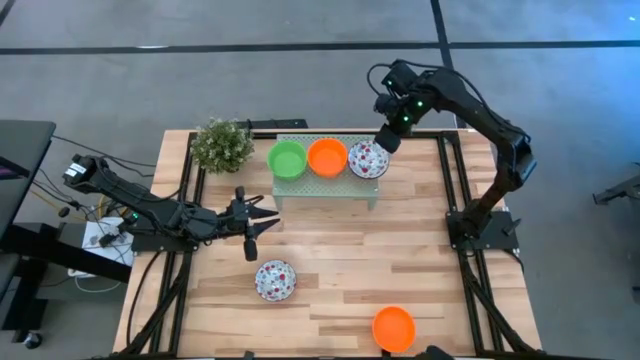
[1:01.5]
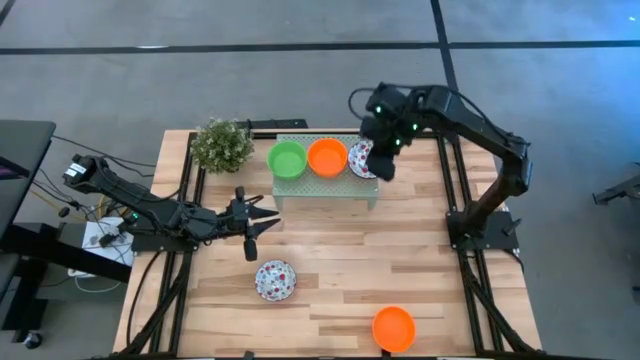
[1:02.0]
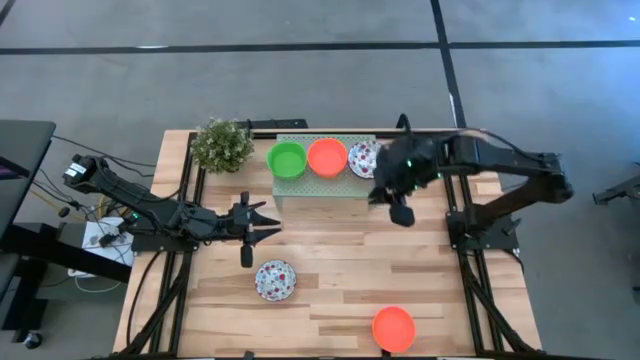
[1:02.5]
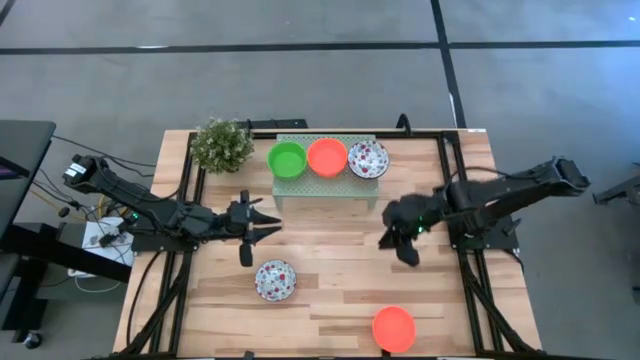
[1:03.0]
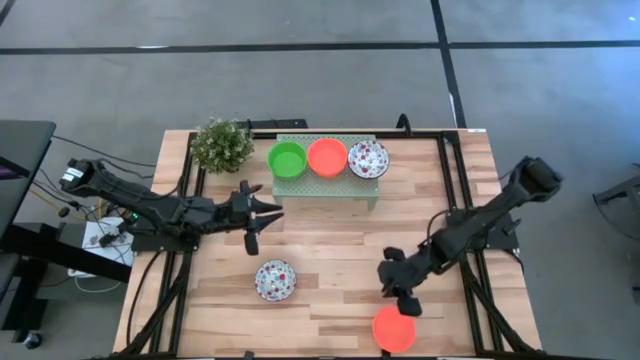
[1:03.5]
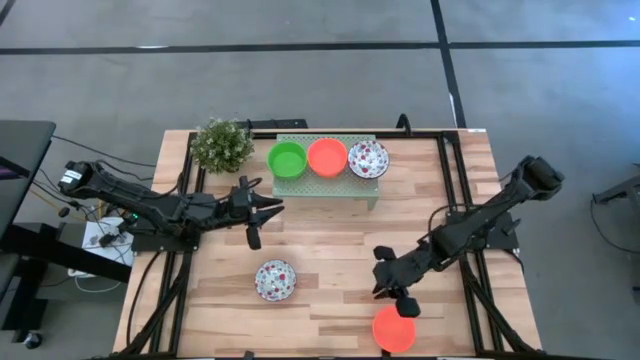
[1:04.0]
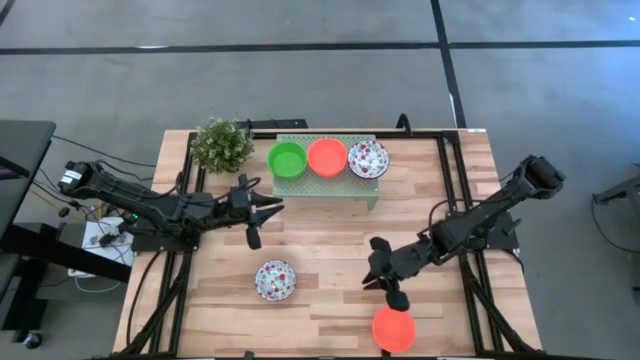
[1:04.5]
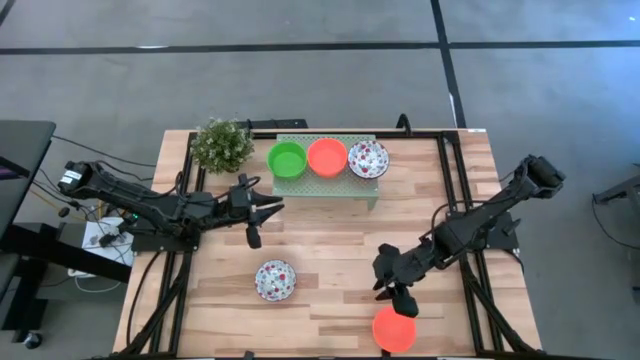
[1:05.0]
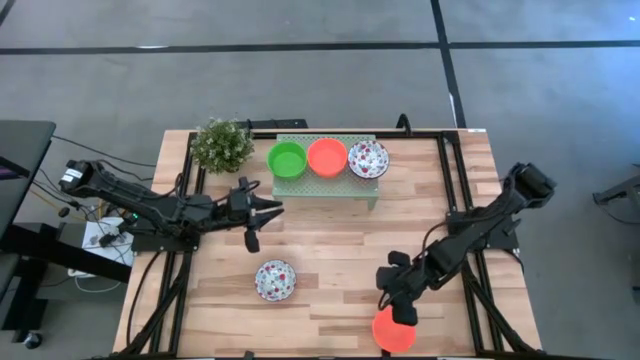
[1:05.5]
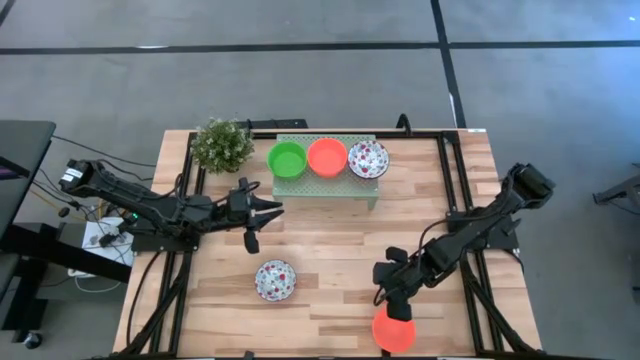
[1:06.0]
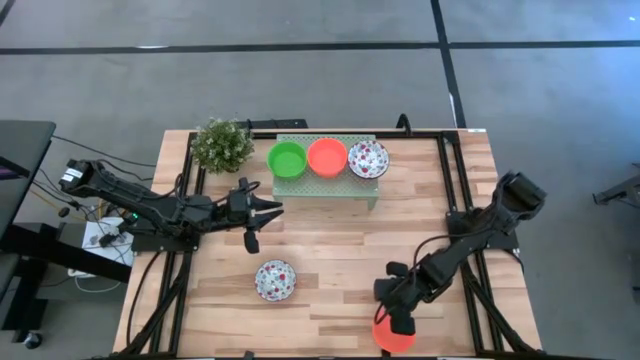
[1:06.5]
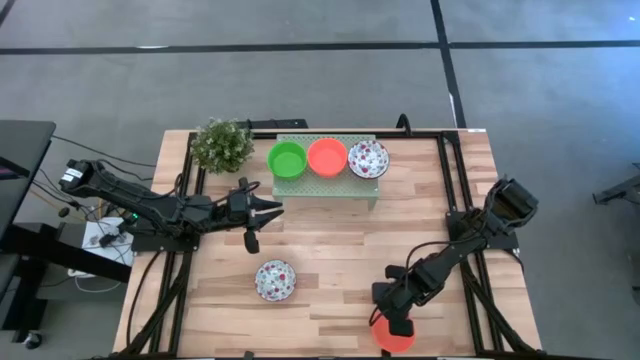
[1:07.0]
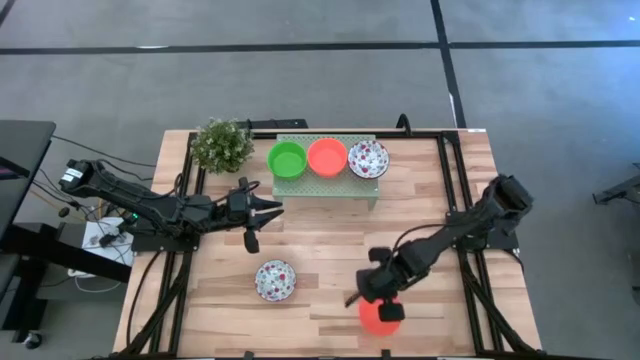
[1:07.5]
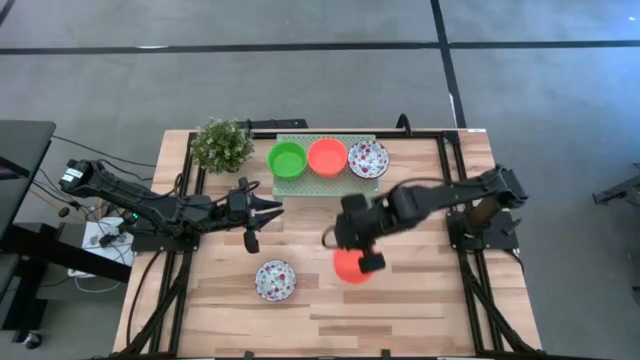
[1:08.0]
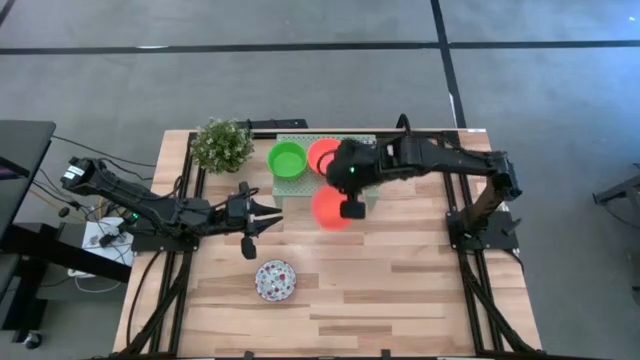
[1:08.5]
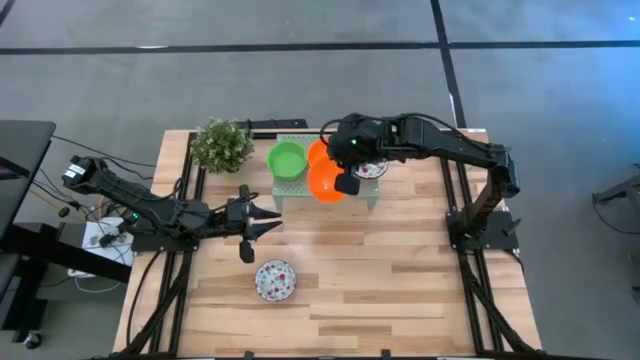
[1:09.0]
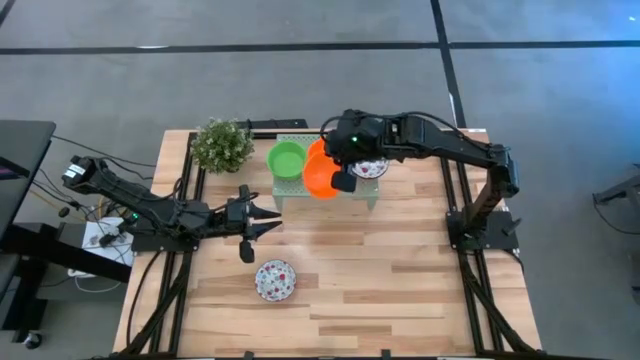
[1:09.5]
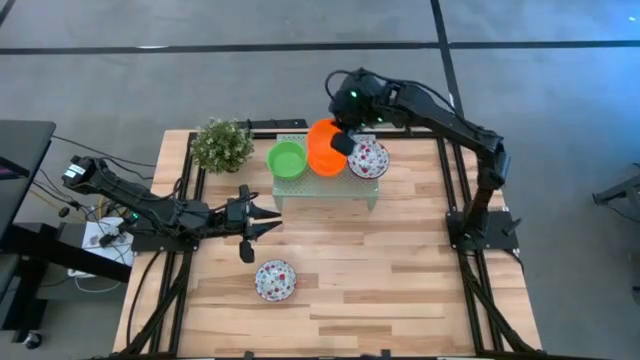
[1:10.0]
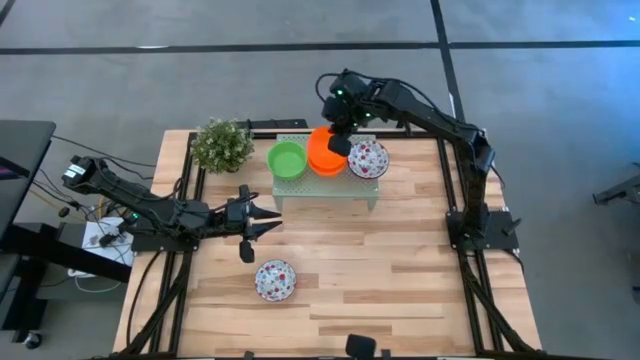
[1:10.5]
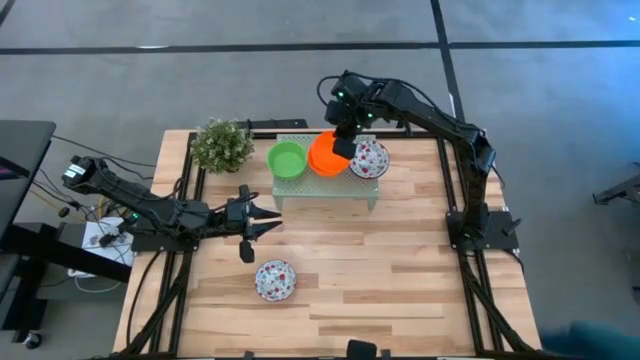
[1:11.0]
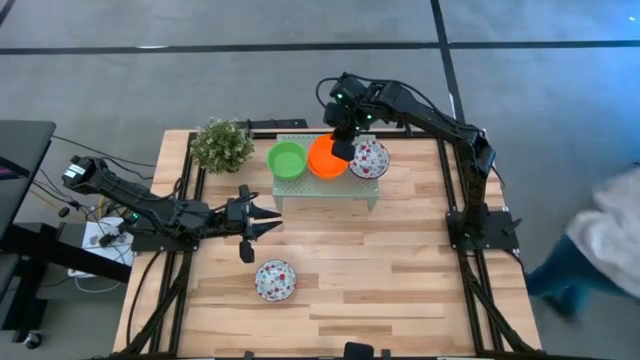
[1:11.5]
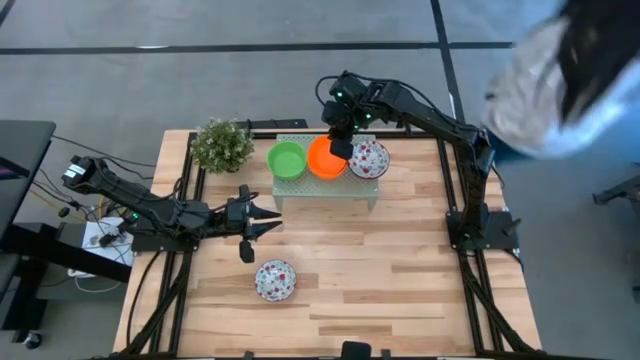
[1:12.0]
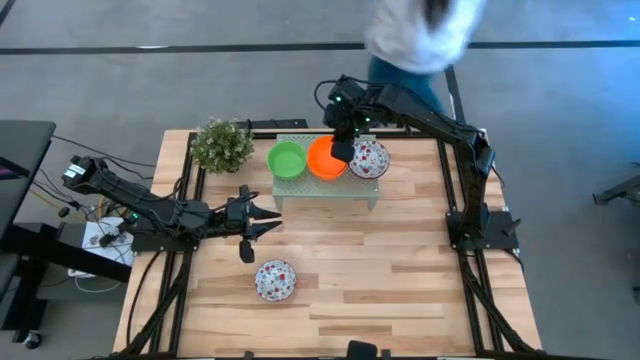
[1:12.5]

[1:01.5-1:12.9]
Task: Pick & Place Mini bowls
Stack the orange bowl on the orange bowl on the shelf

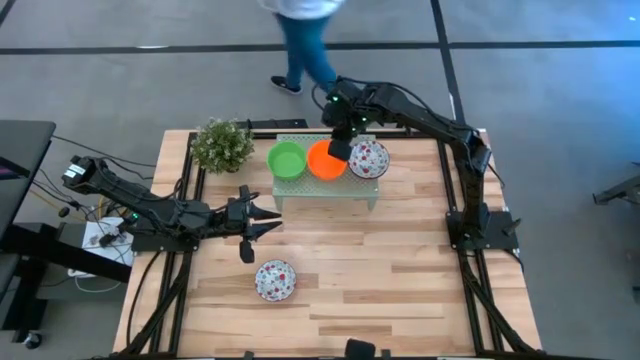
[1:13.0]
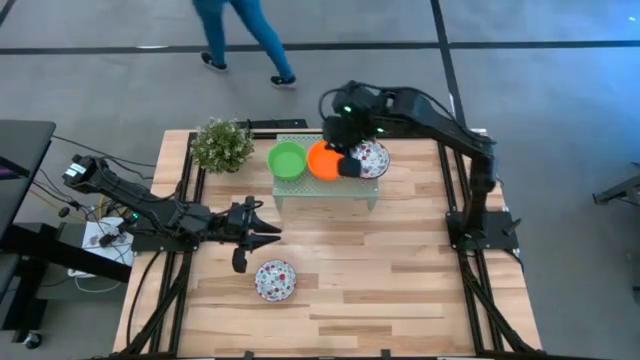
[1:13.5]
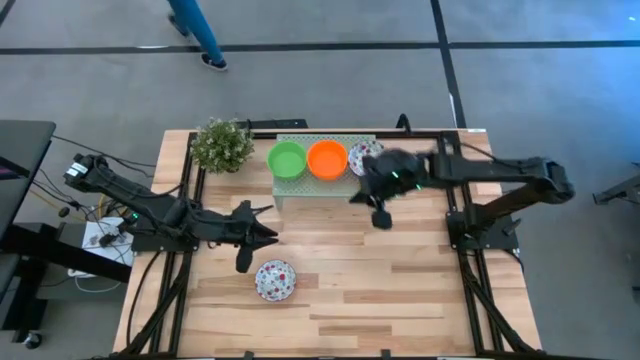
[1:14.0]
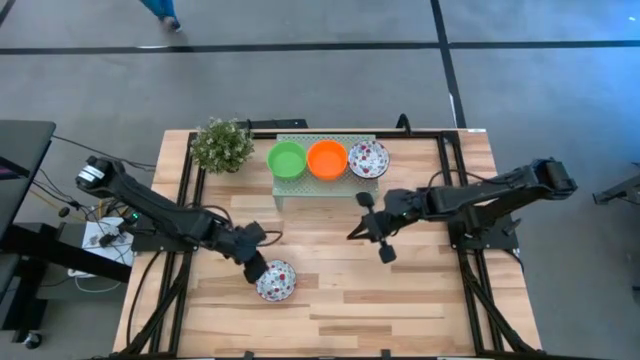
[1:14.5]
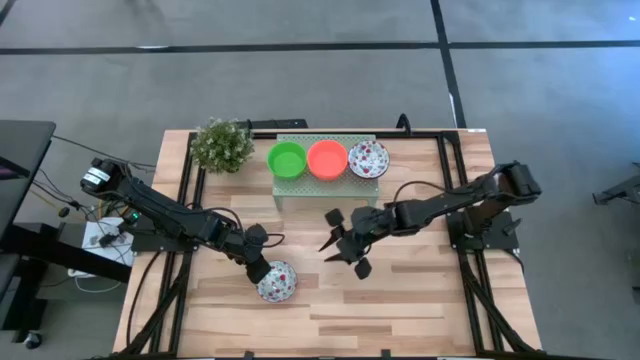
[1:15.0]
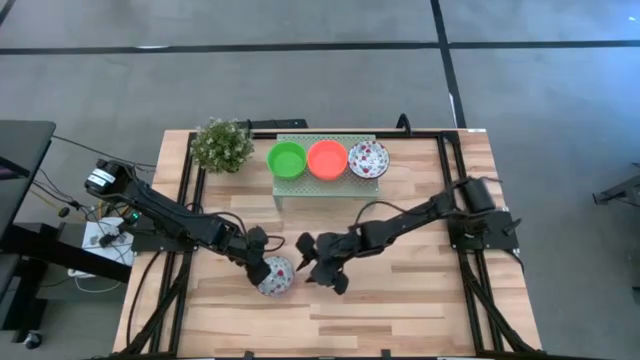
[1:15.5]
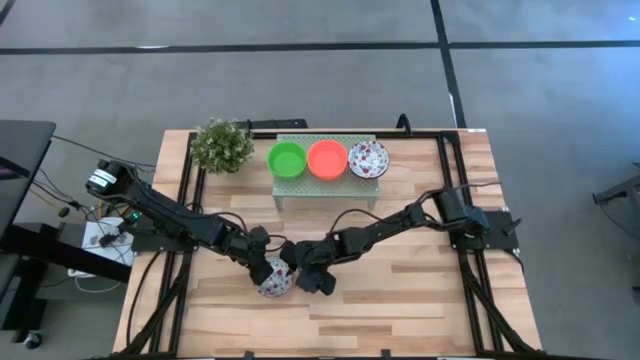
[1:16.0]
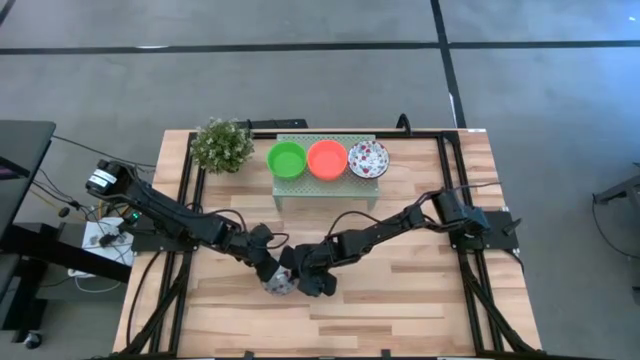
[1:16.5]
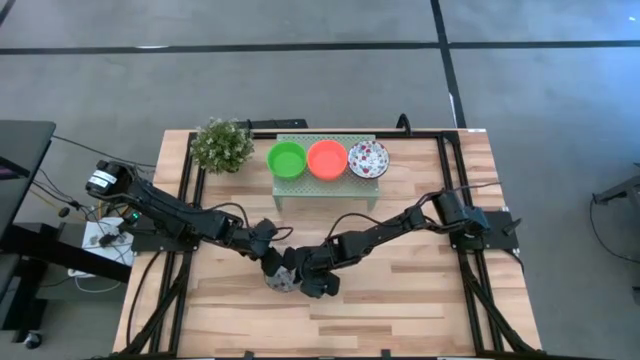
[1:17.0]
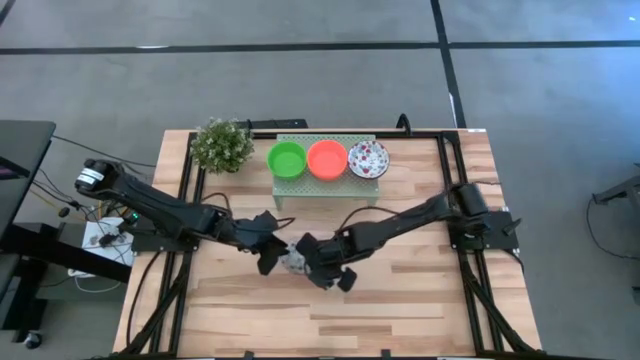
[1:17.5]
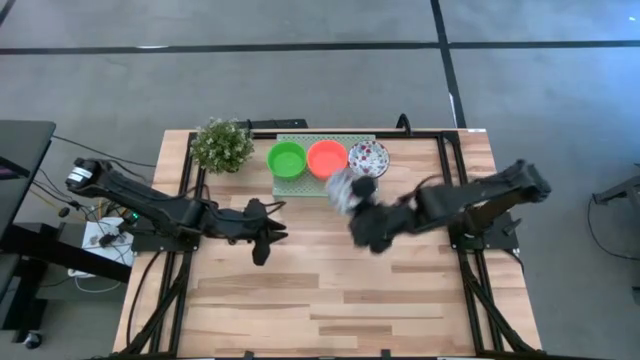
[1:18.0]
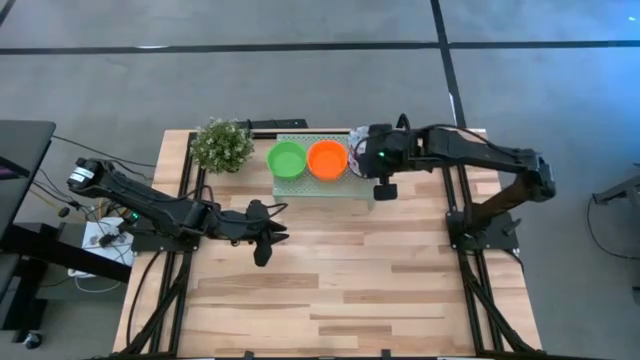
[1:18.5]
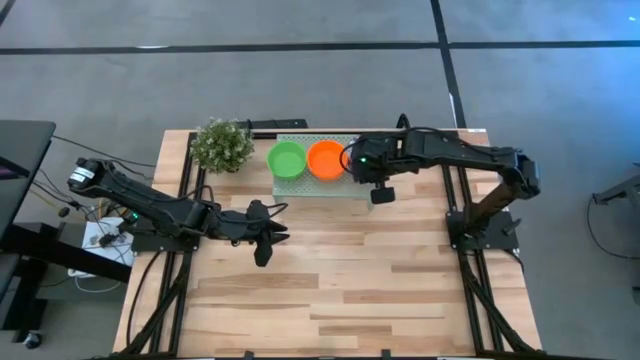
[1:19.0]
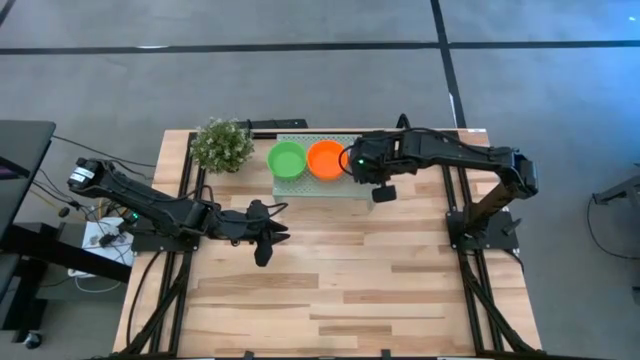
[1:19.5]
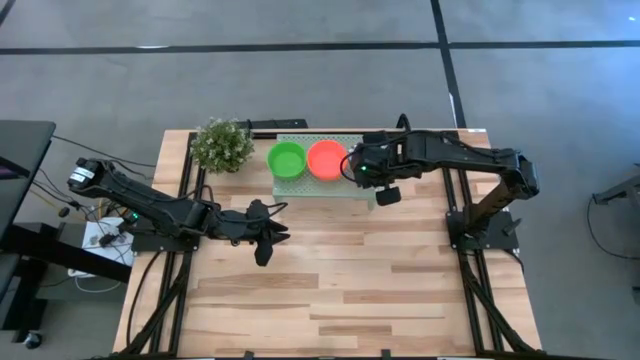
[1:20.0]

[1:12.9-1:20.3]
Stack the white bowl on the white bowl on the shelf

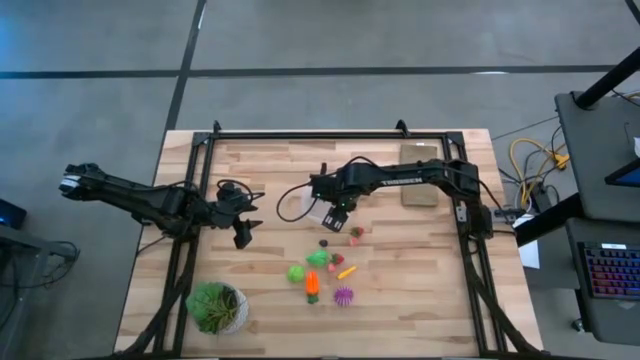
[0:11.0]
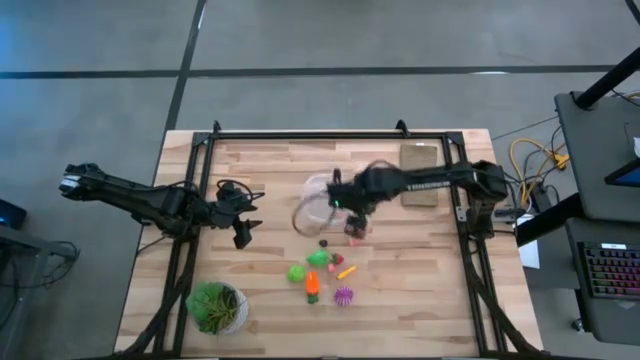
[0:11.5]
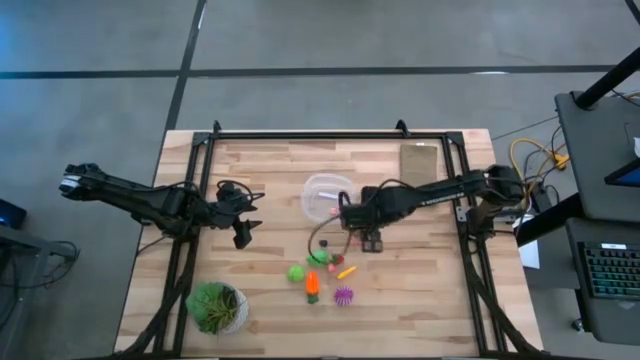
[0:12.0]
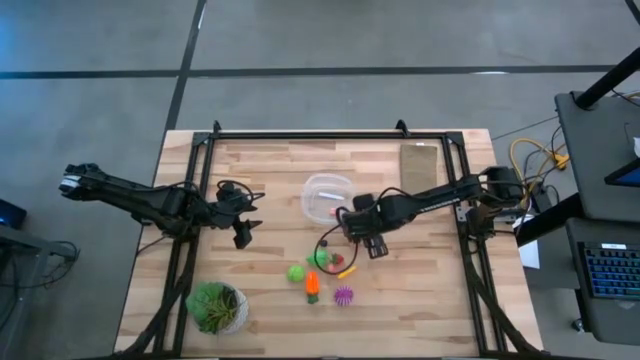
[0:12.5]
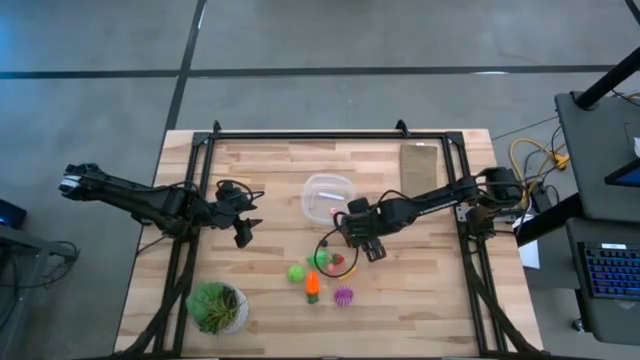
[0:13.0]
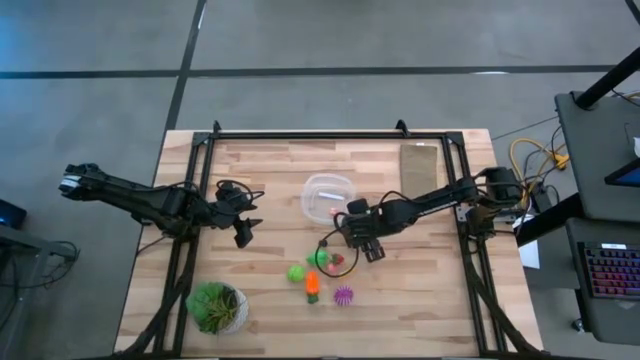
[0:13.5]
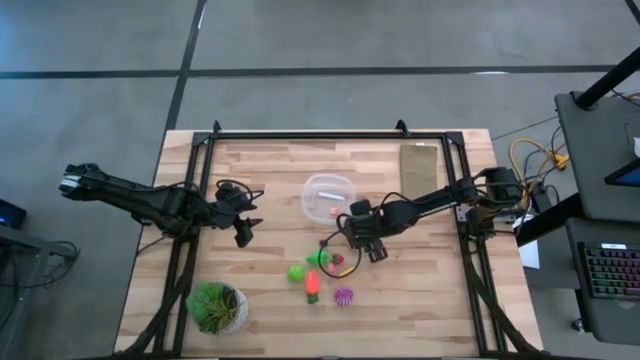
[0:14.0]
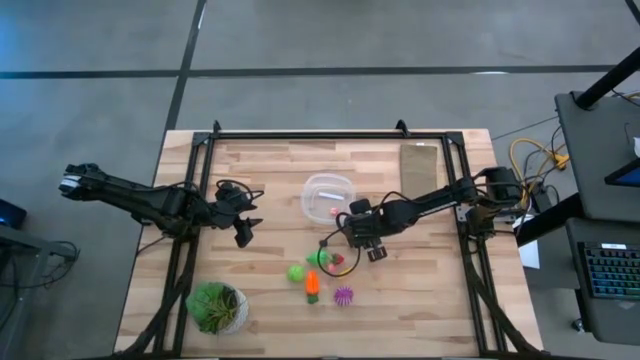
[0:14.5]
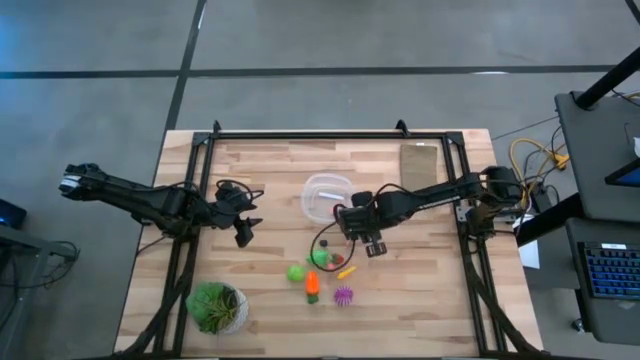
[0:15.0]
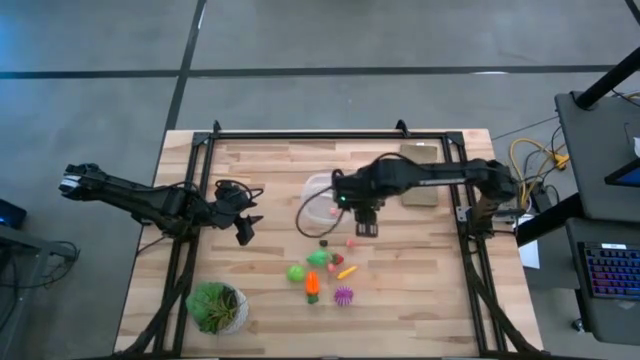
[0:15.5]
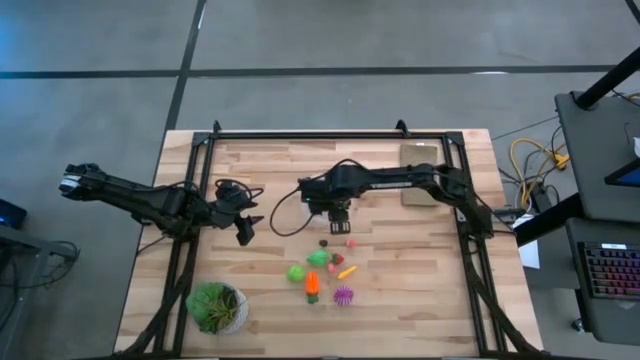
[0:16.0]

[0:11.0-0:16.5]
Task: Pick and placing Produce into tupperware
Put the top red strawberry into the transparent container
